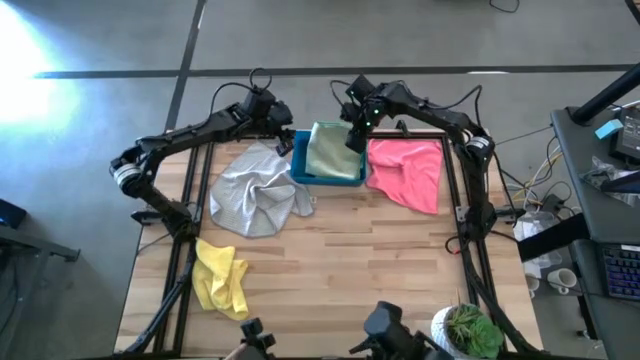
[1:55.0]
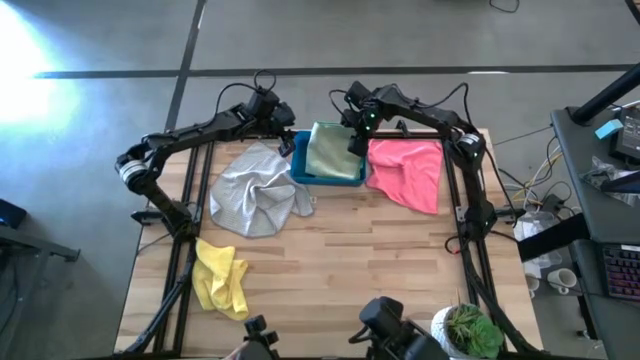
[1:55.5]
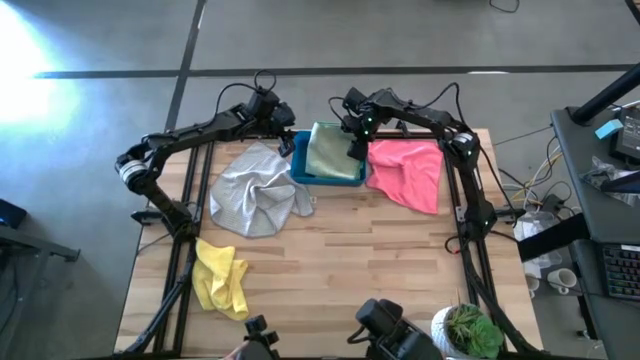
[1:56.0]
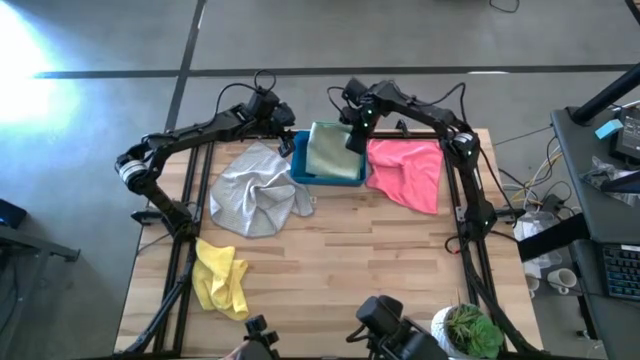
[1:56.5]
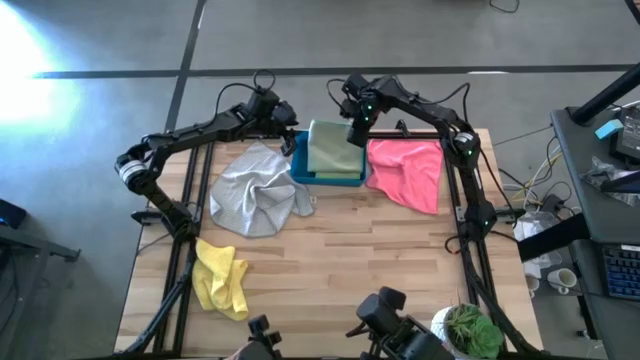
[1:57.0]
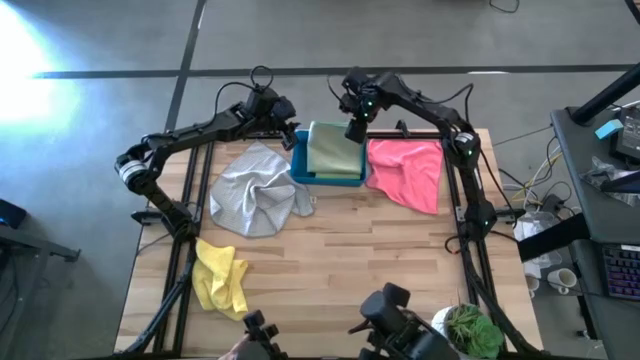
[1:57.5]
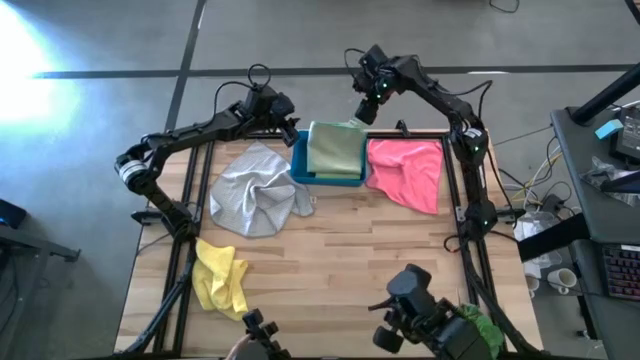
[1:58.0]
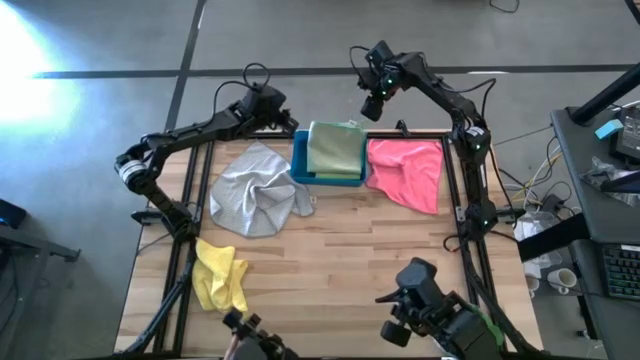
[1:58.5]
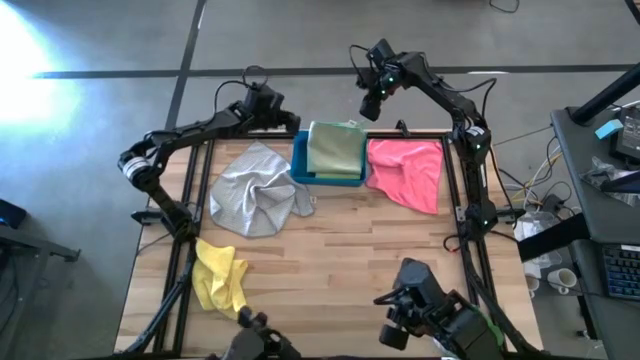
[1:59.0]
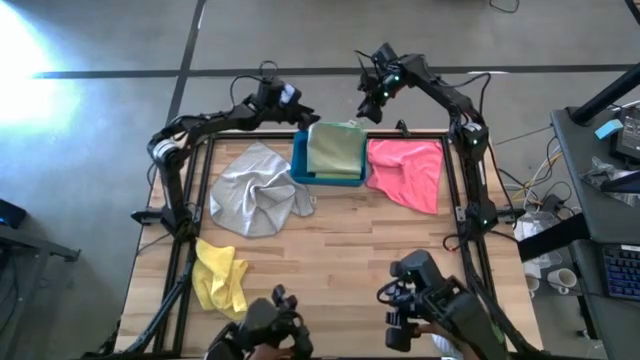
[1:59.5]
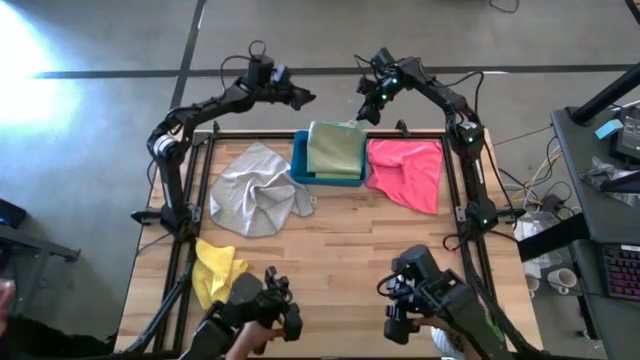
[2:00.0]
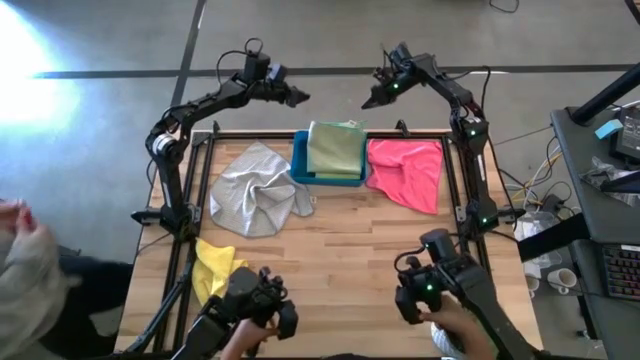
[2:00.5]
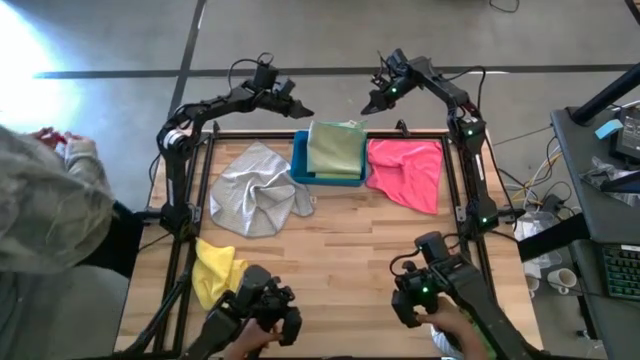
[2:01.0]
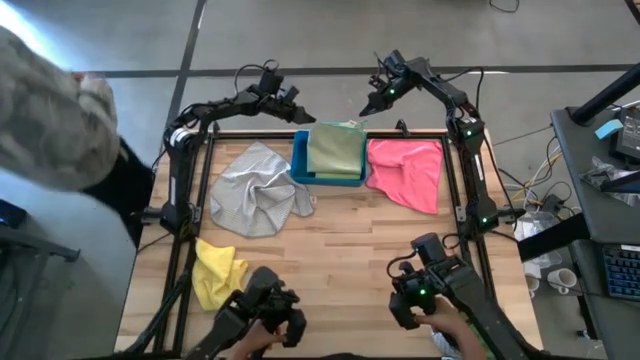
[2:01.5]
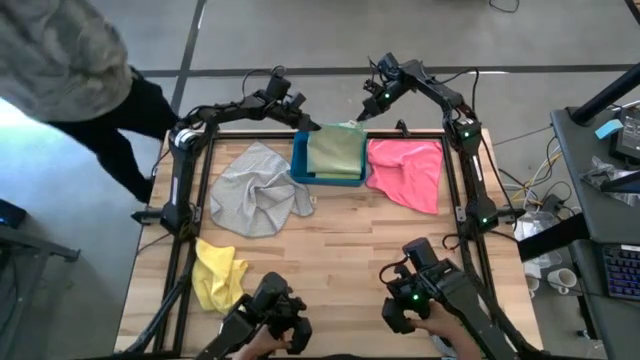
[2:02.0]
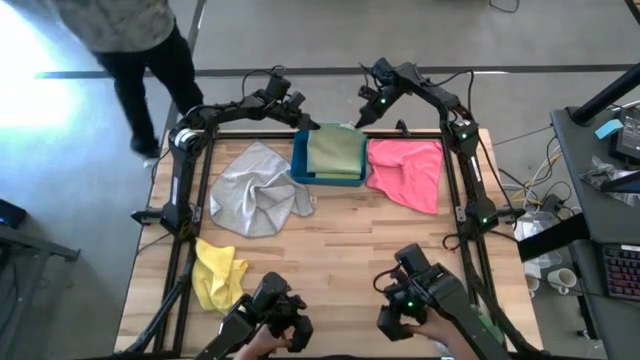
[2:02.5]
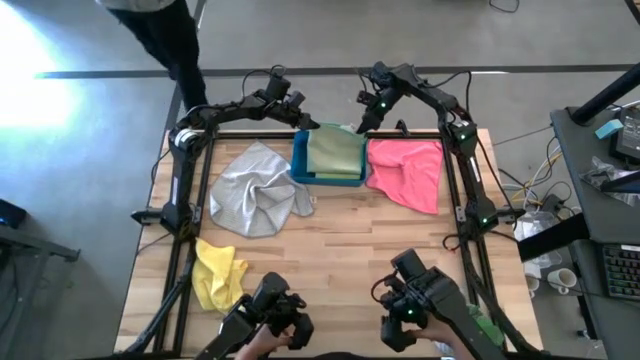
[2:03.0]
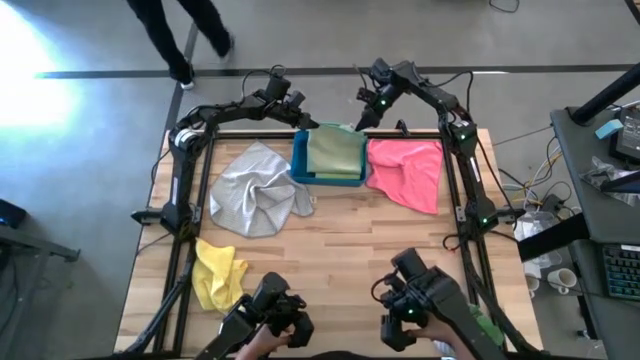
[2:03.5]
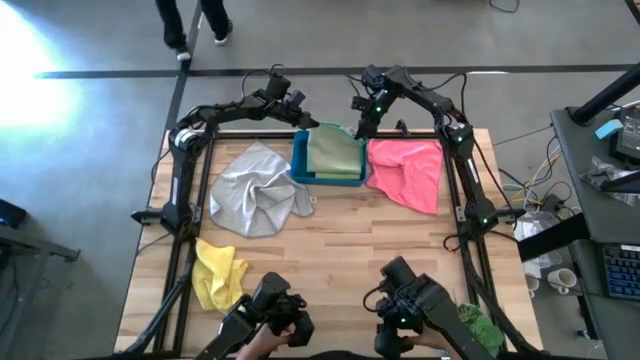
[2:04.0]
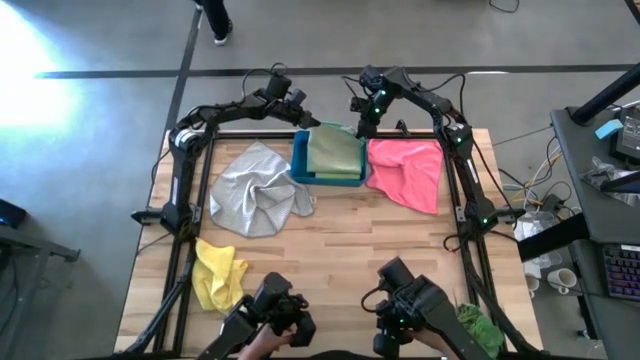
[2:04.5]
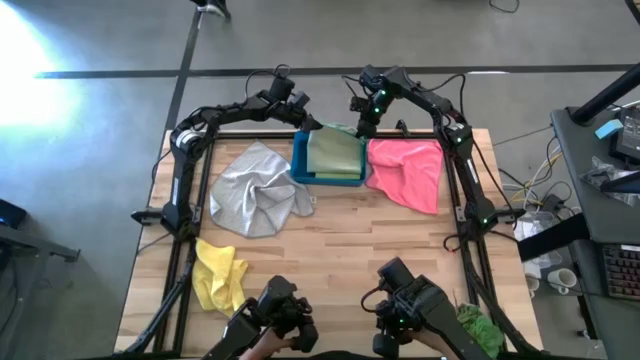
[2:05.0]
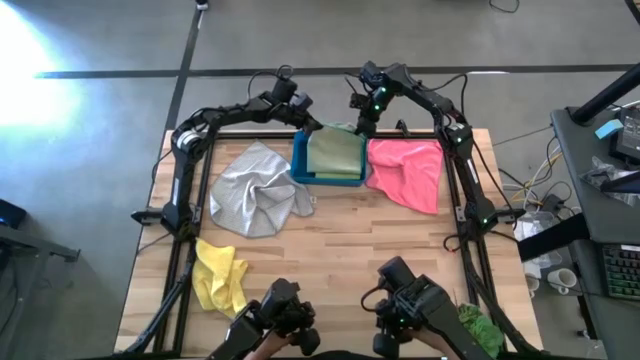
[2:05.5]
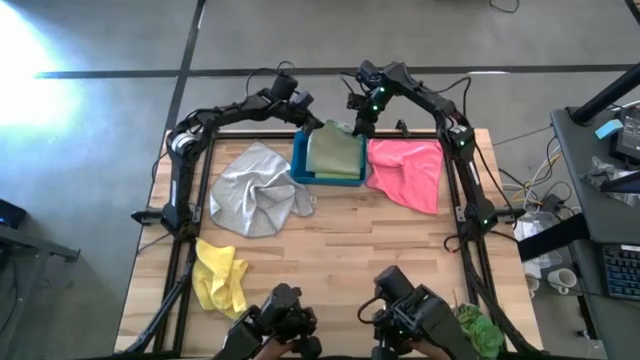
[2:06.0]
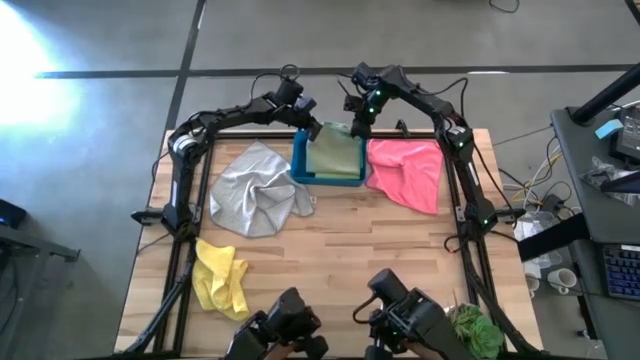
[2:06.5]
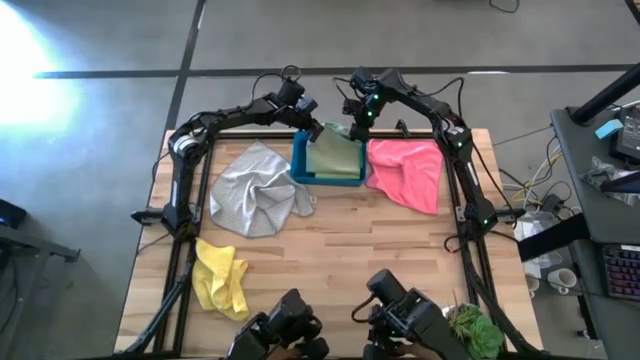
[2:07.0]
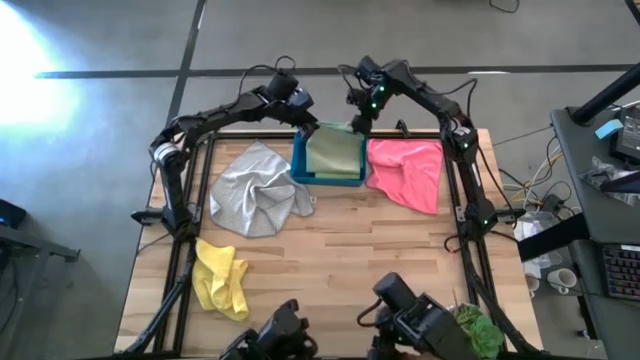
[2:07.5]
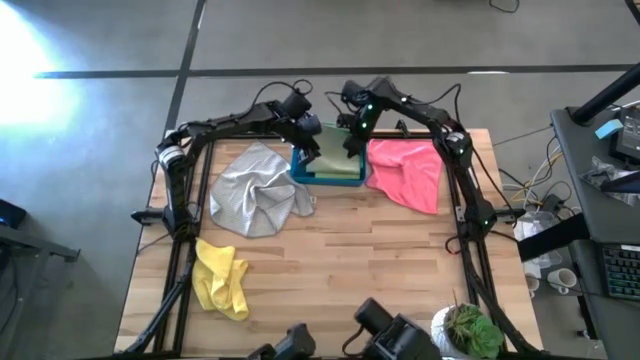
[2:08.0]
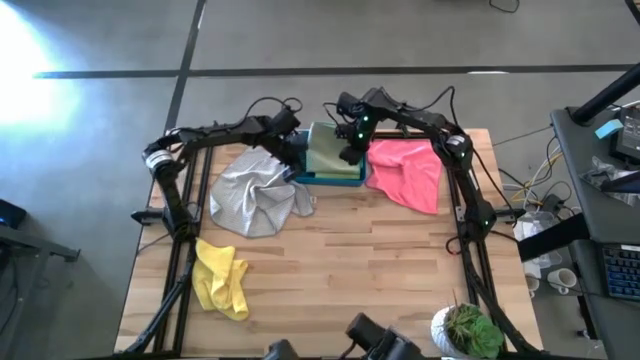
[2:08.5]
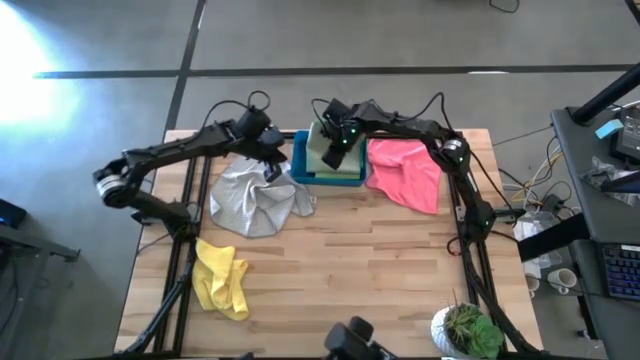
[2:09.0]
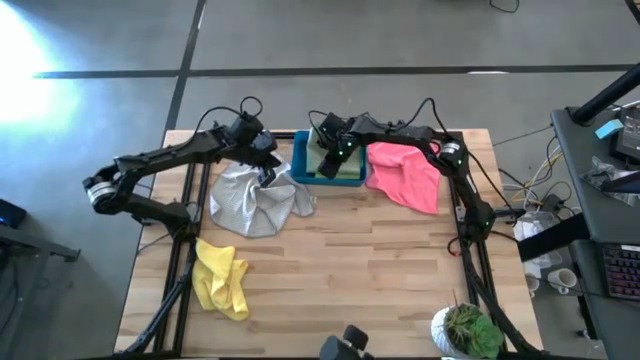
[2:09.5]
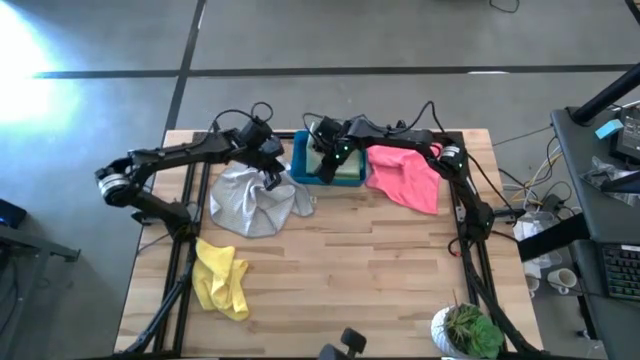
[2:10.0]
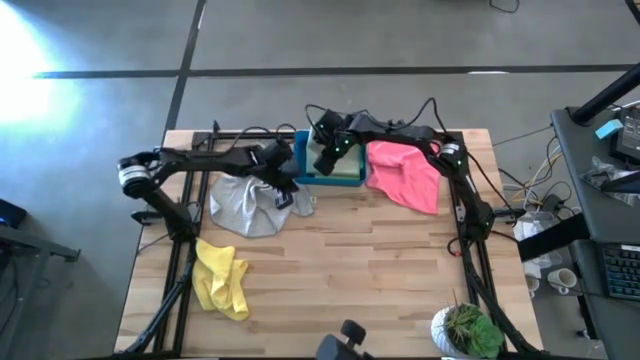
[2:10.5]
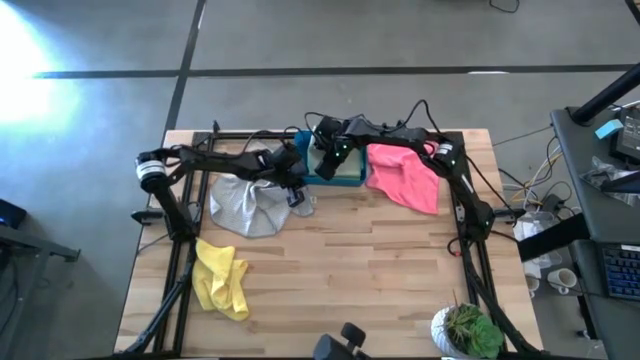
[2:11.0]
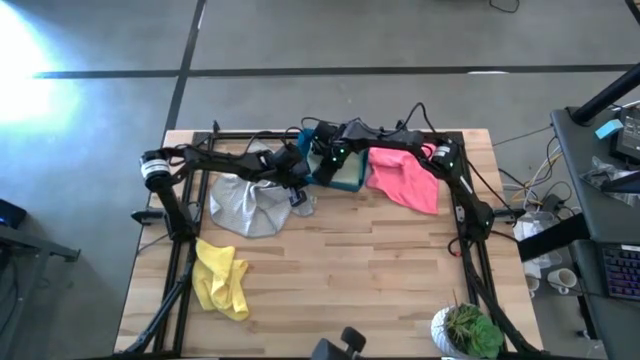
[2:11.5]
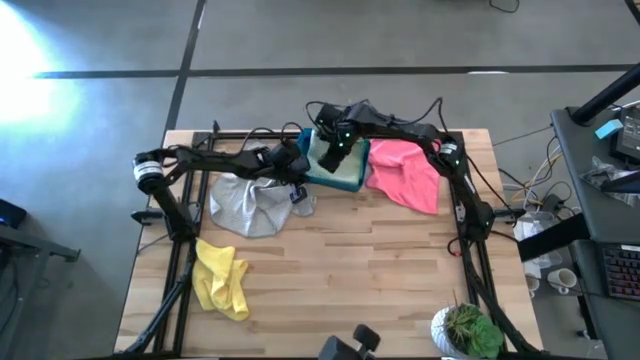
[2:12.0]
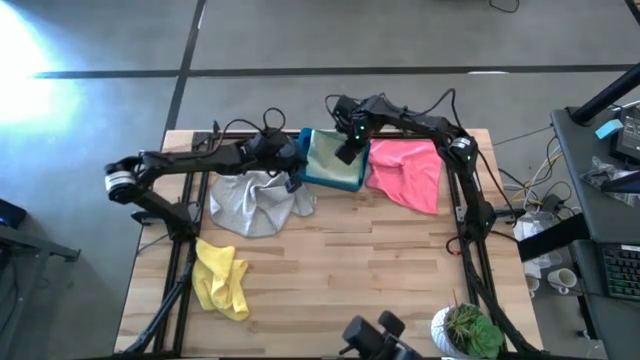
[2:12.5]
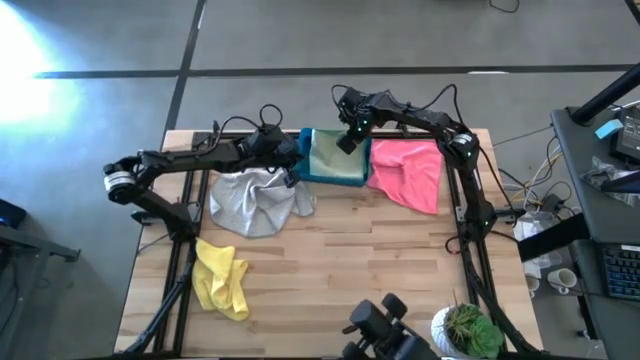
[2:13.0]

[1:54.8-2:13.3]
Task: Fold microfiber towels
Put the green microfiber cloth into the blue bin
